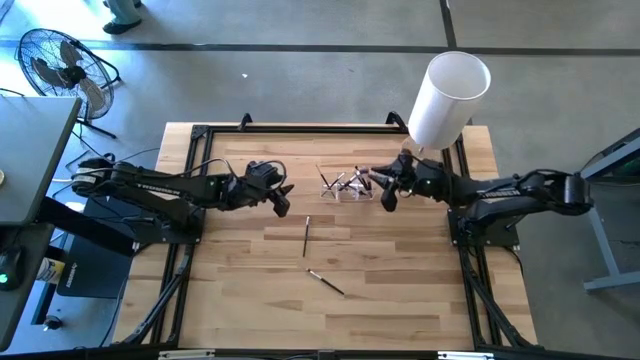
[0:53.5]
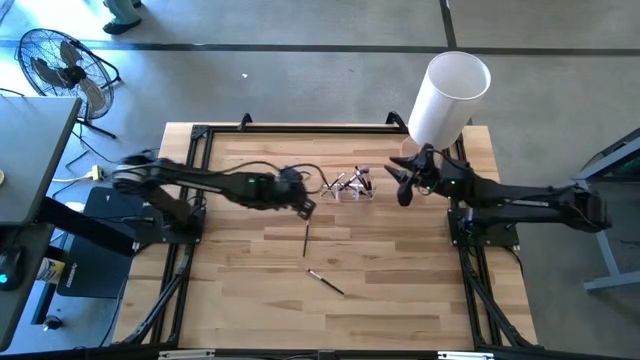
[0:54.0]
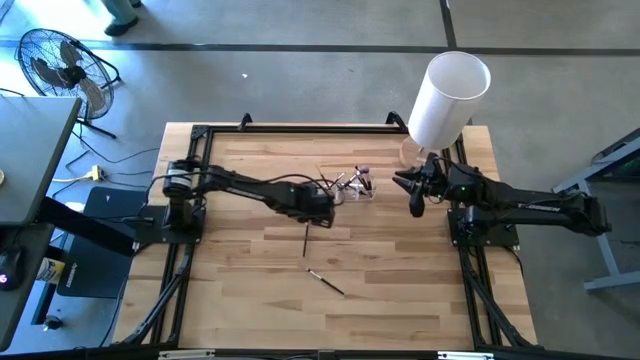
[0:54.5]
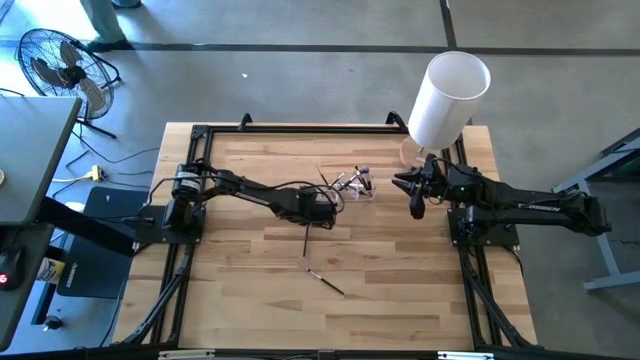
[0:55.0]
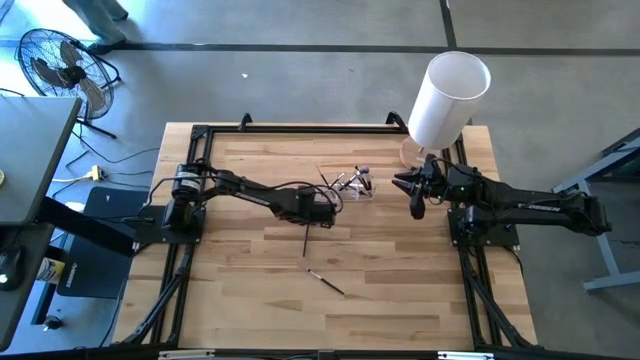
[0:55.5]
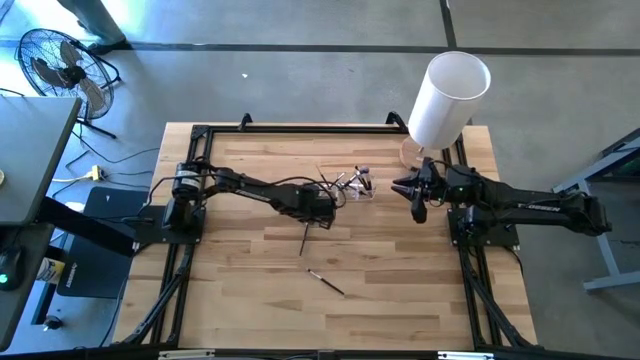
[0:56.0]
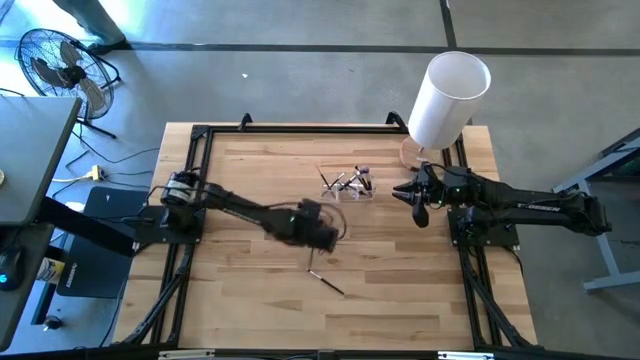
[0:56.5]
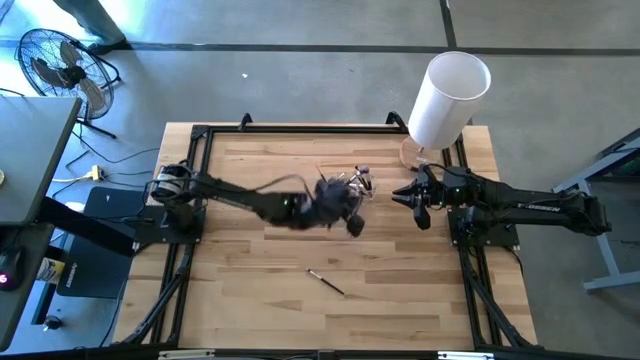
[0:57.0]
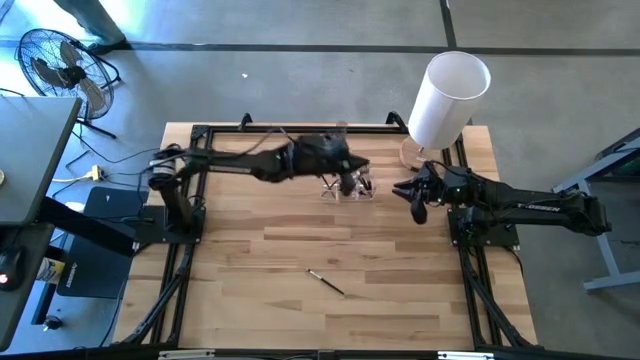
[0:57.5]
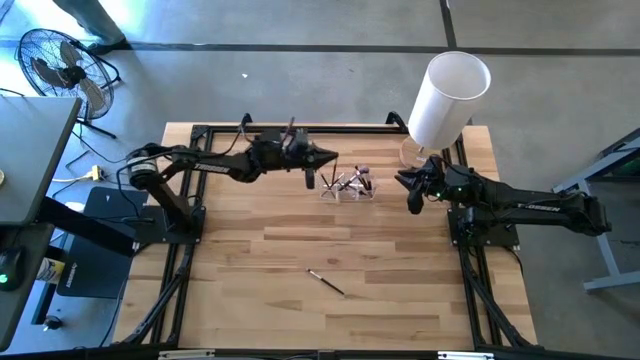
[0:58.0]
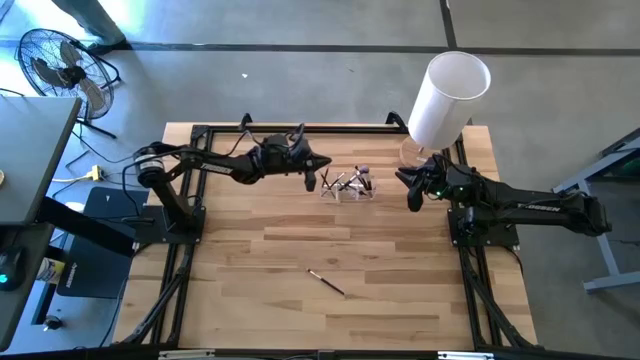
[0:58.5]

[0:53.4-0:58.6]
Task: Put items in baskets/containers
Put the eyeshadow brush into the left section of the transparent organizer

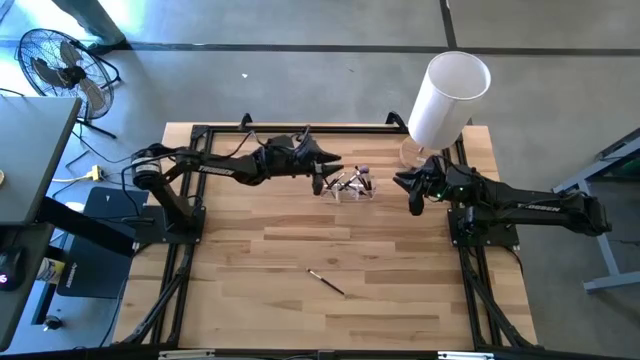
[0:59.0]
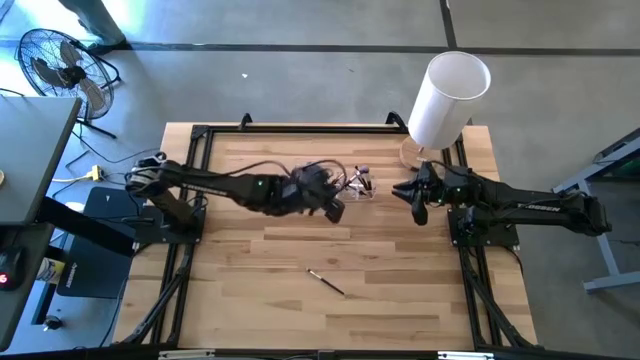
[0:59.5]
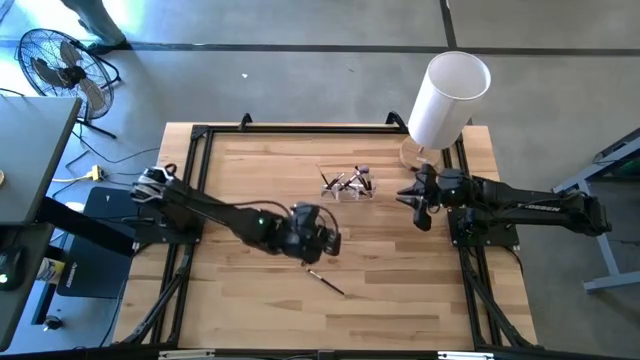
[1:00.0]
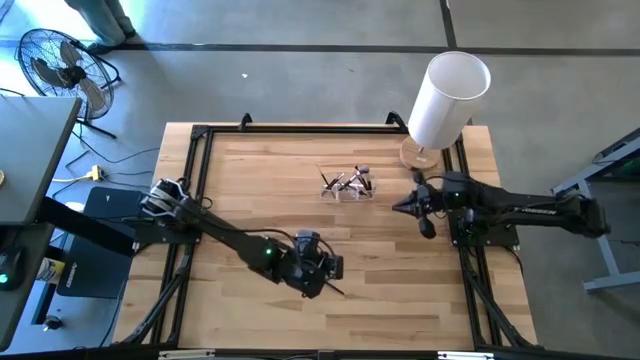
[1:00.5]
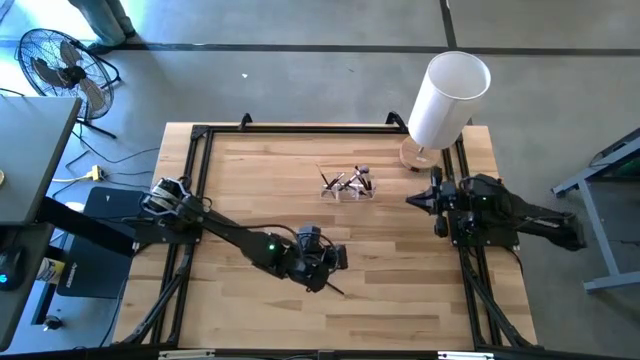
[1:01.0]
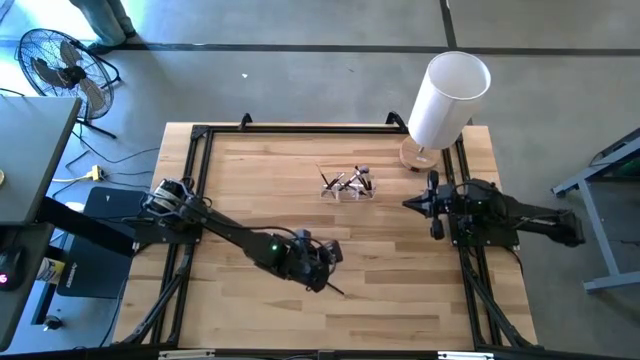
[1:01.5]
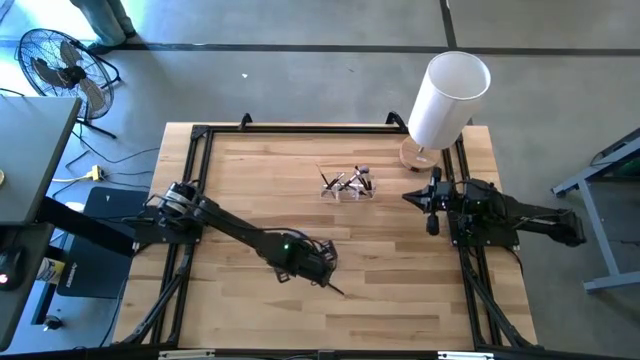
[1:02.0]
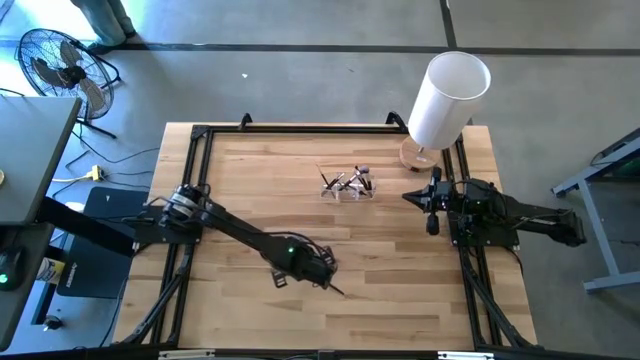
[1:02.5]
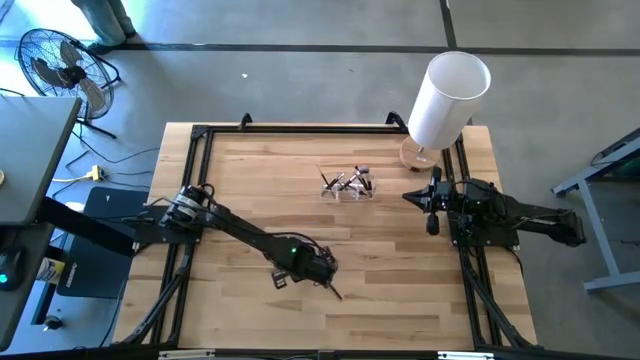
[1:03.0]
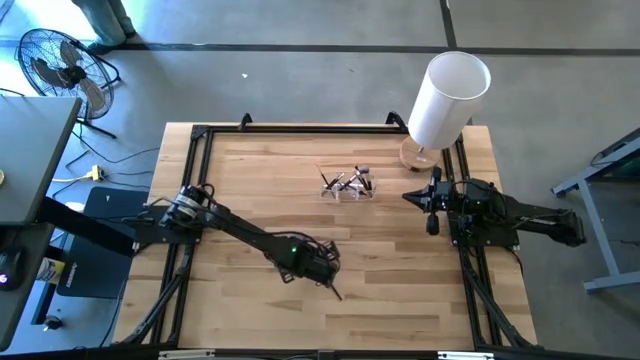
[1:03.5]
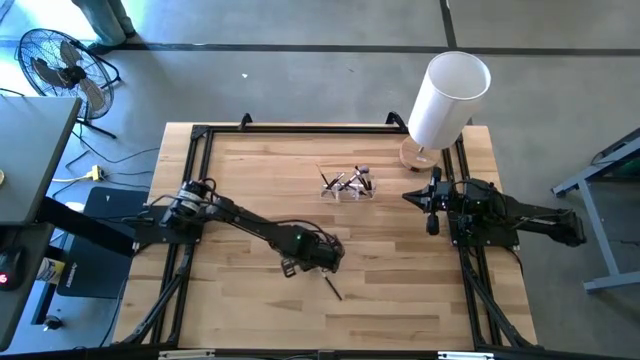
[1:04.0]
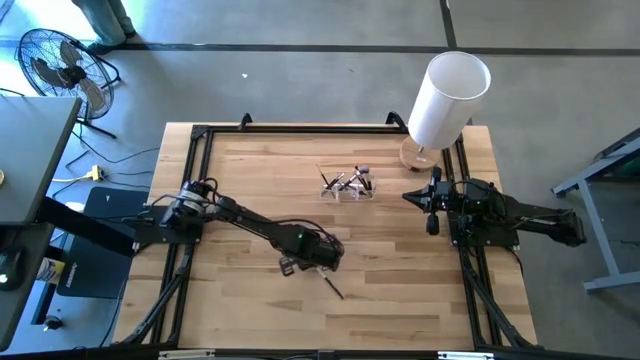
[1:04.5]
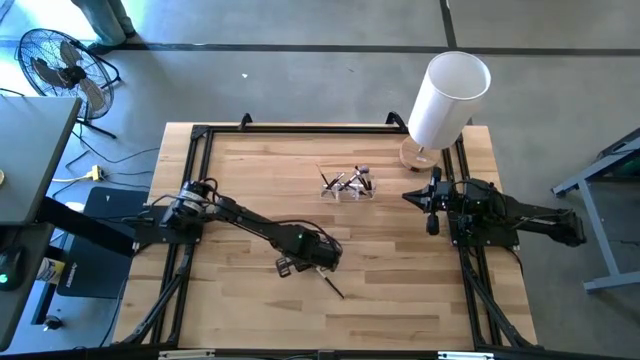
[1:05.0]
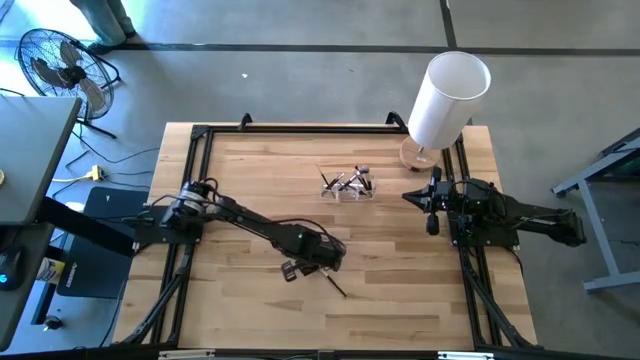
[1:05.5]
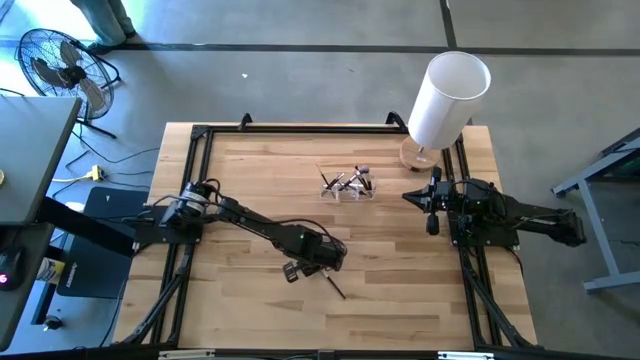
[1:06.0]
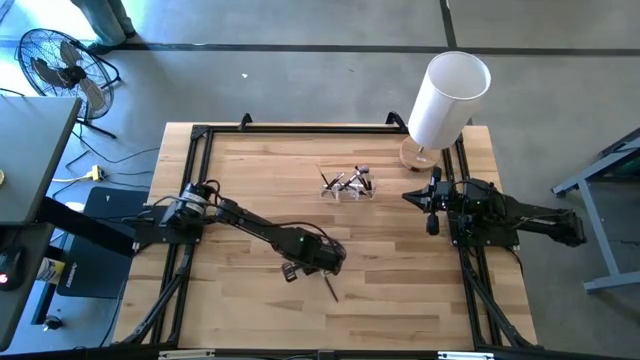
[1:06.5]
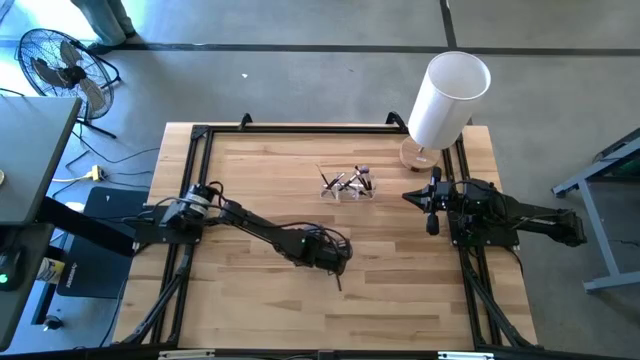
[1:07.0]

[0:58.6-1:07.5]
Put the eyeshadow brush into the middle section of the transparent organizer

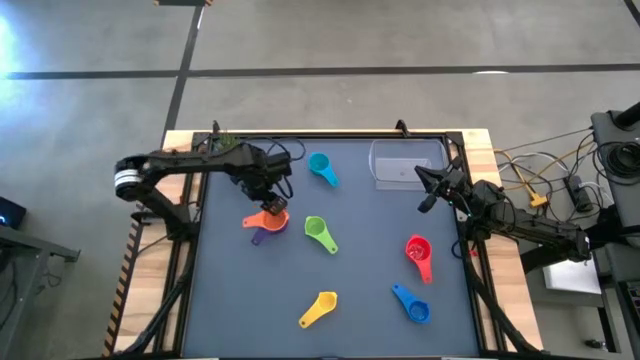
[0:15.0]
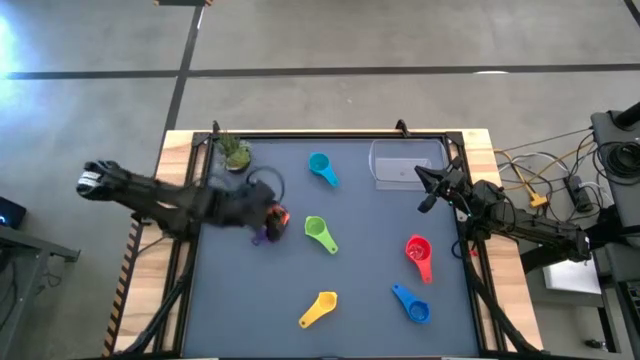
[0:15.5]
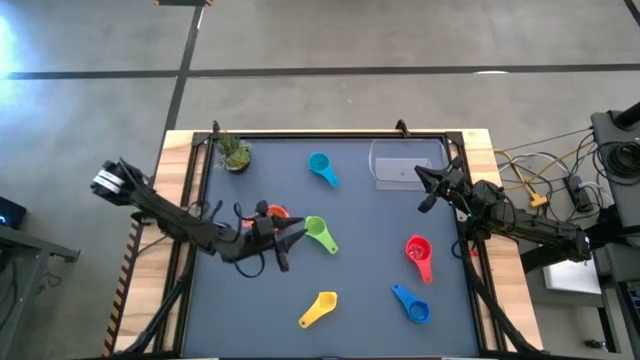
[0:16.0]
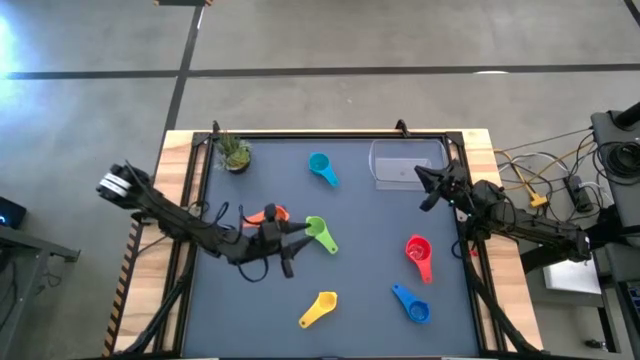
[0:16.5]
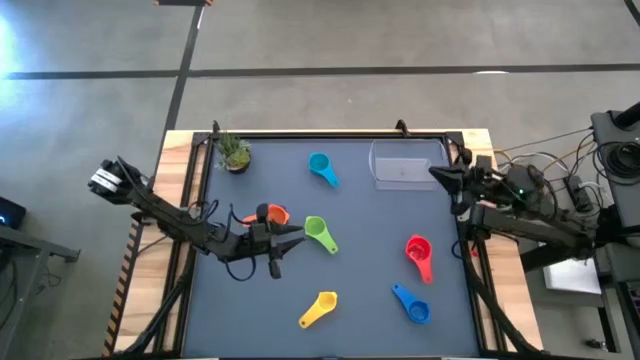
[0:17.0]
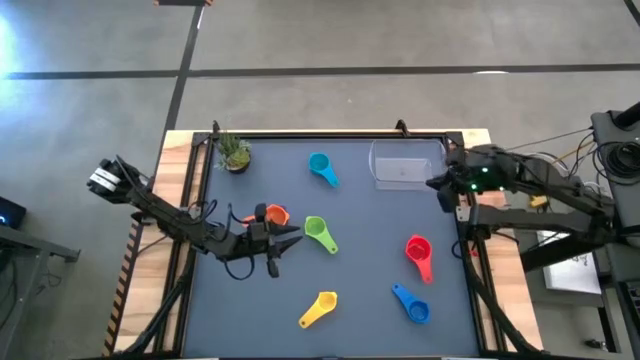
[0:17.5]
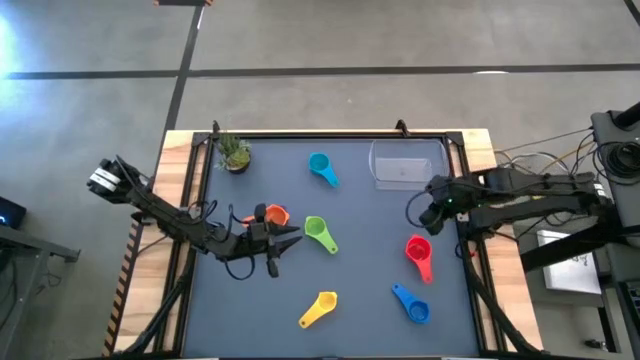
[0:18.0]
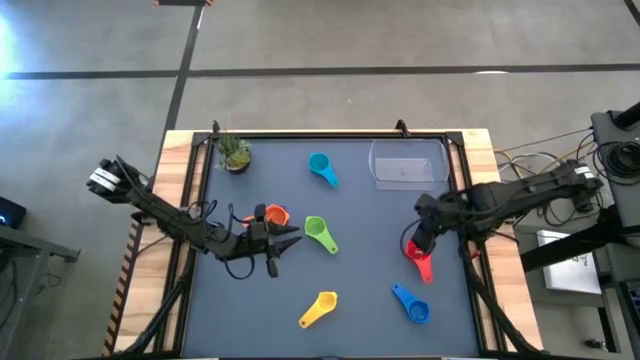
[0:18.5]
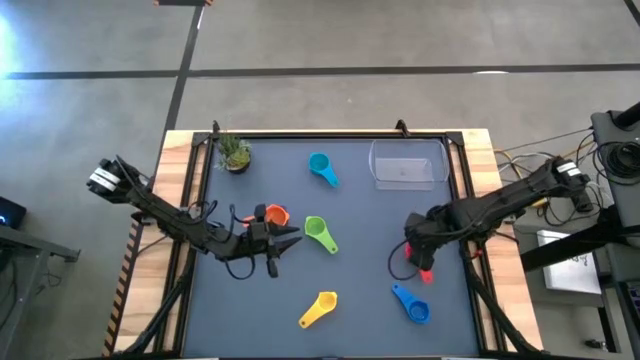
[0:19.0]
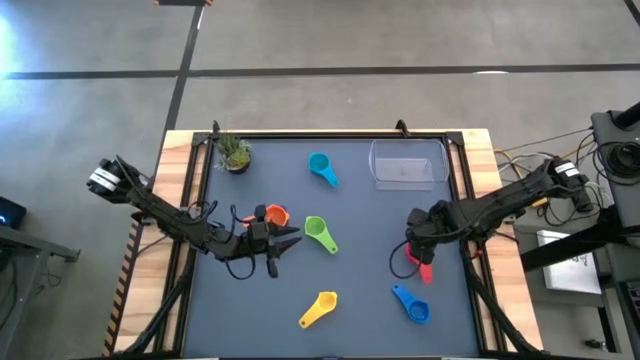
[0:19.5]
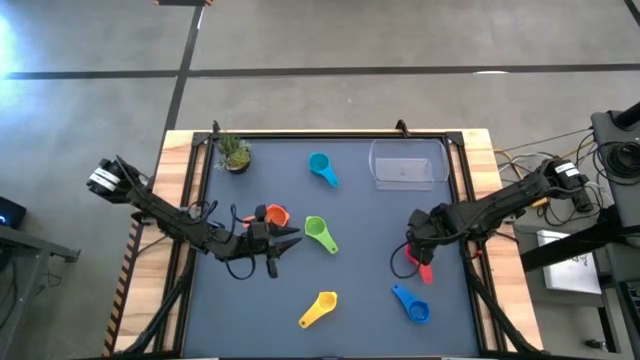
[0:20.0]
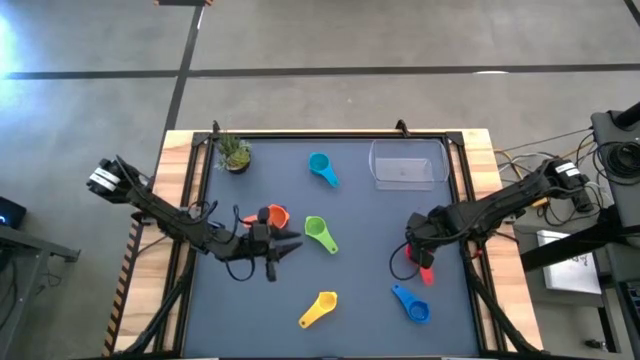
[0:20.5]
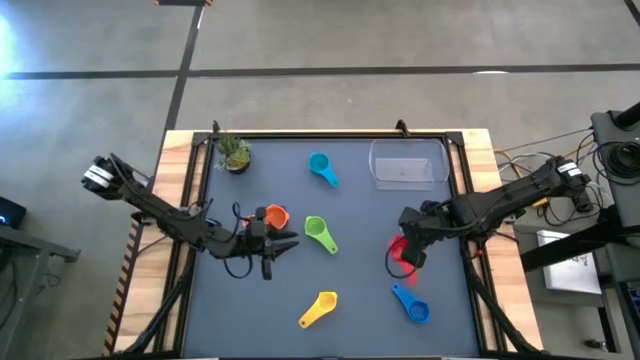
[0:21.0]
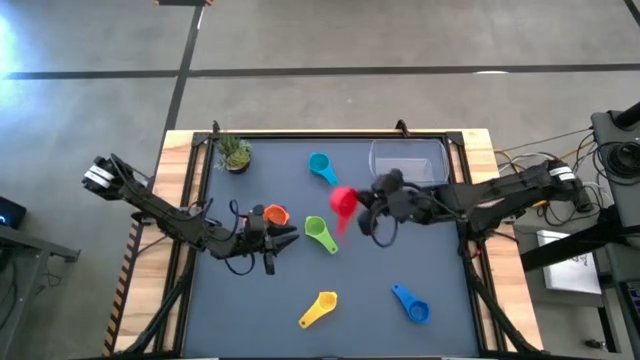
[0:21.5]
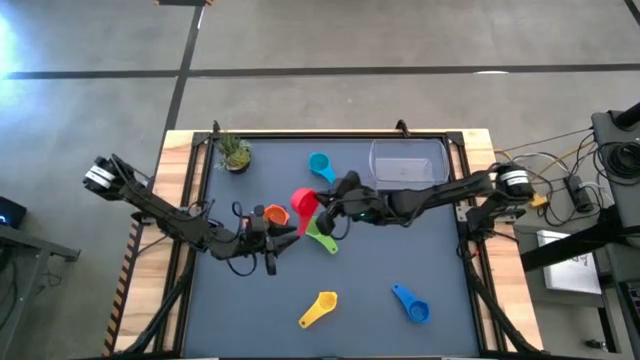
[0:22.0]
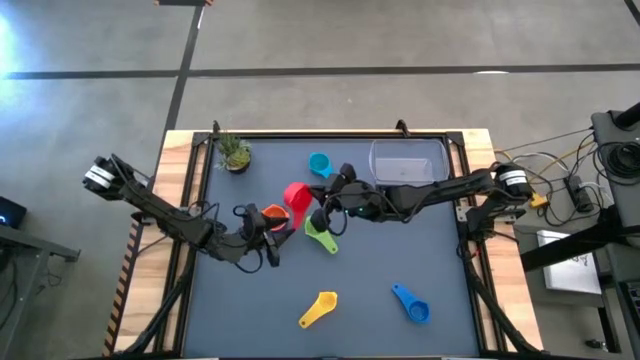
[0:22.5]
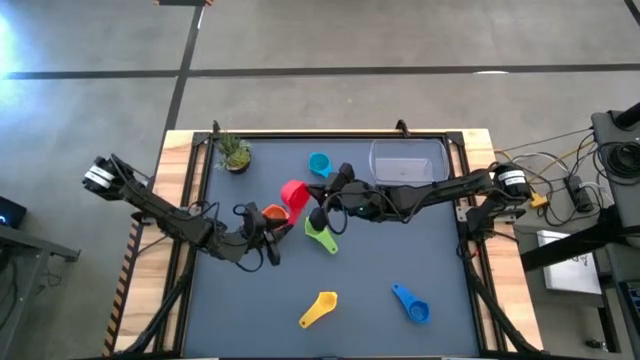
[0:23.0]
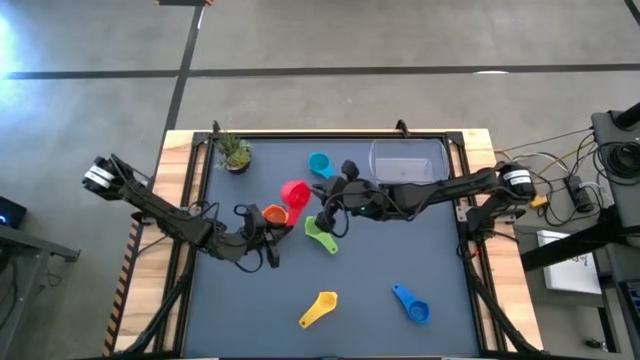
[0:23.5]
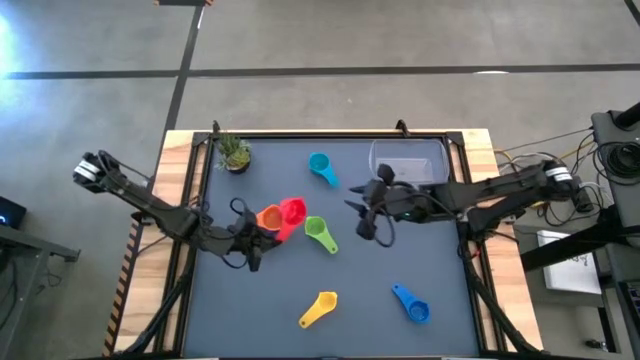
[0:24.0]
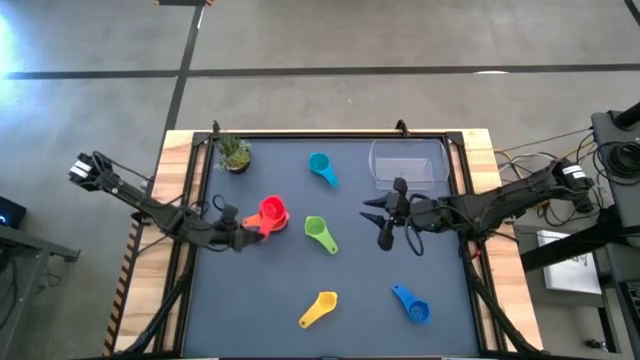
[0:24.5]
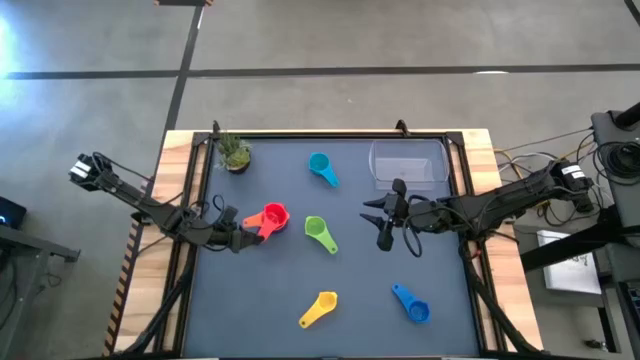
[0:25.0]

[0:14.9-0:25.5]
Task: Nest measuring cups in basket
Stack the red measuring cup on top of the orange measuring cup
